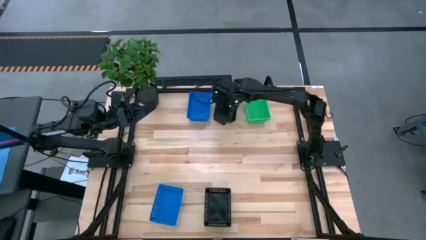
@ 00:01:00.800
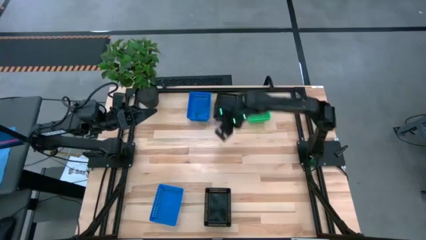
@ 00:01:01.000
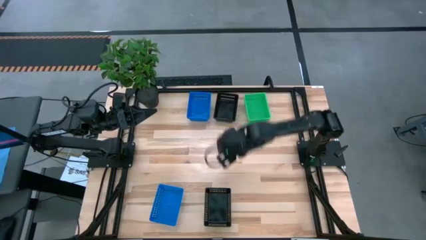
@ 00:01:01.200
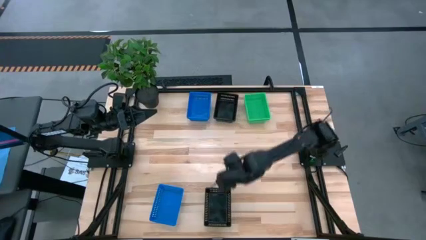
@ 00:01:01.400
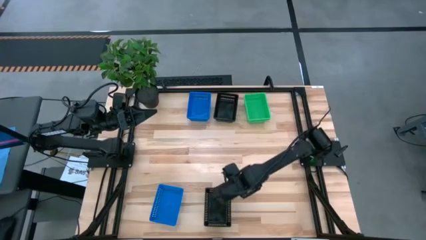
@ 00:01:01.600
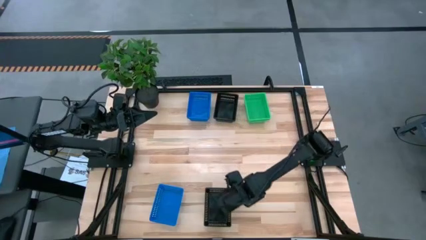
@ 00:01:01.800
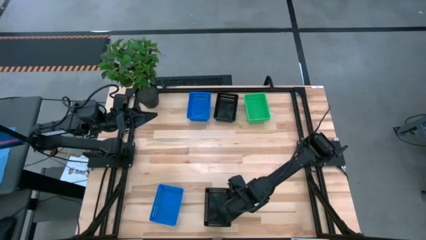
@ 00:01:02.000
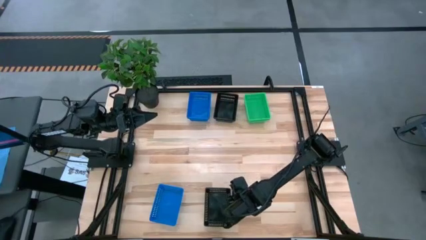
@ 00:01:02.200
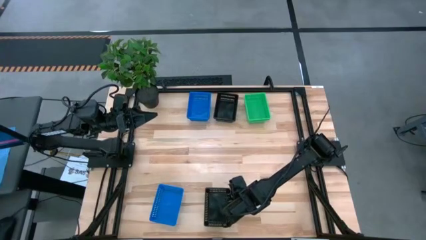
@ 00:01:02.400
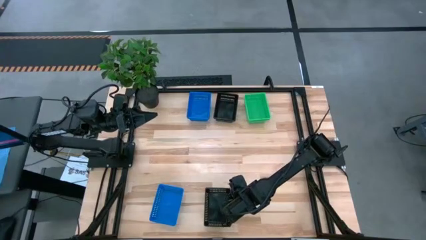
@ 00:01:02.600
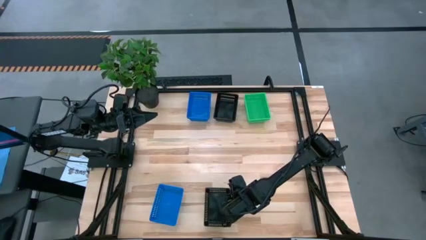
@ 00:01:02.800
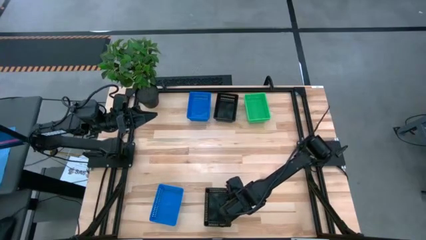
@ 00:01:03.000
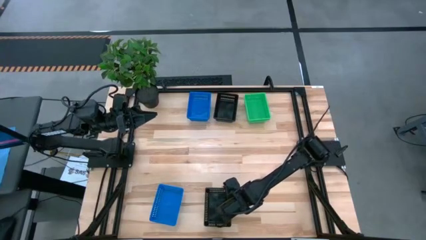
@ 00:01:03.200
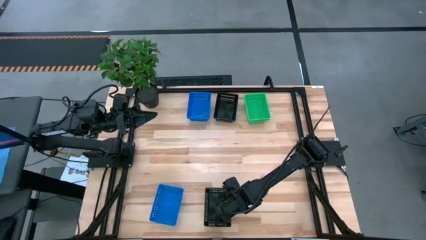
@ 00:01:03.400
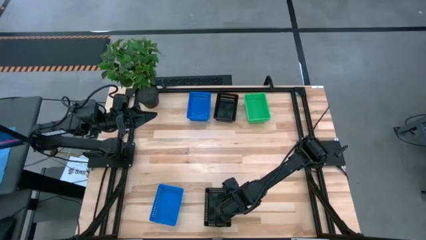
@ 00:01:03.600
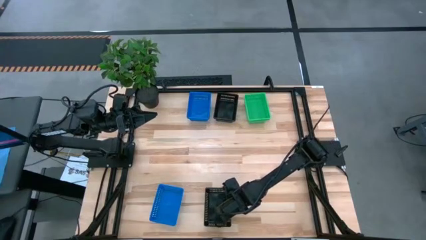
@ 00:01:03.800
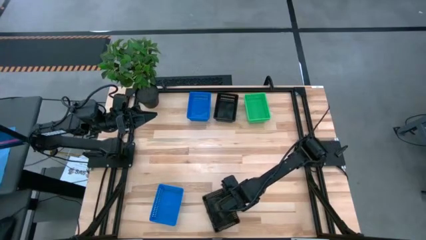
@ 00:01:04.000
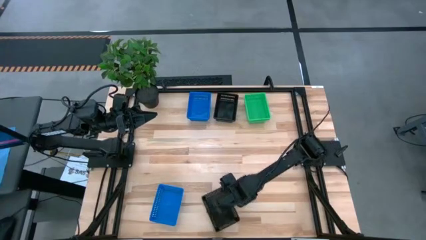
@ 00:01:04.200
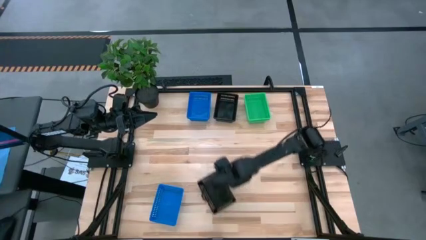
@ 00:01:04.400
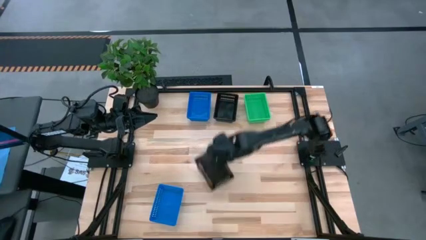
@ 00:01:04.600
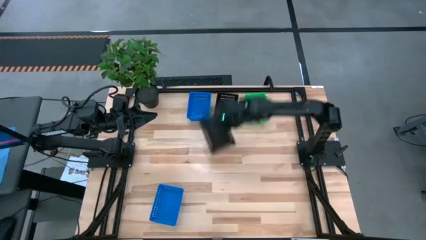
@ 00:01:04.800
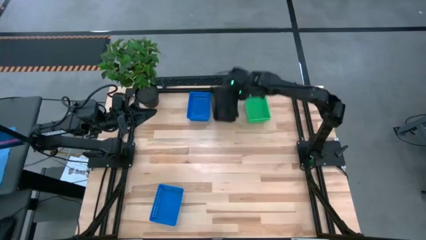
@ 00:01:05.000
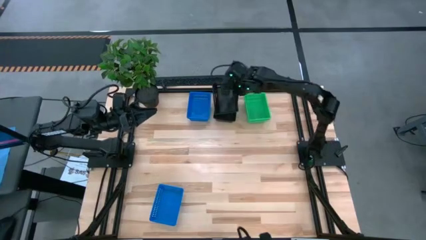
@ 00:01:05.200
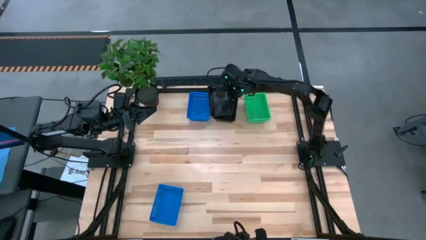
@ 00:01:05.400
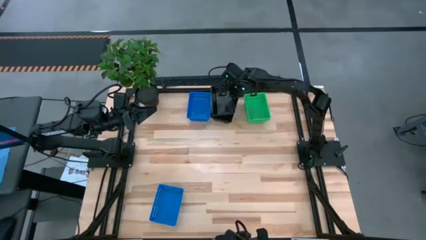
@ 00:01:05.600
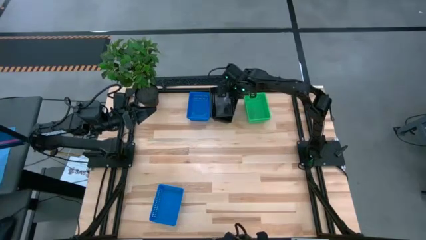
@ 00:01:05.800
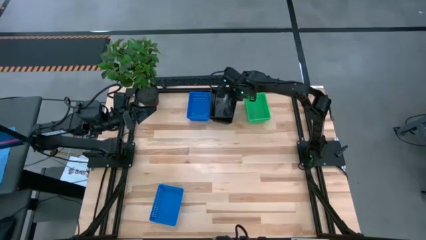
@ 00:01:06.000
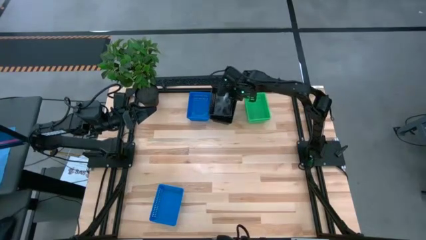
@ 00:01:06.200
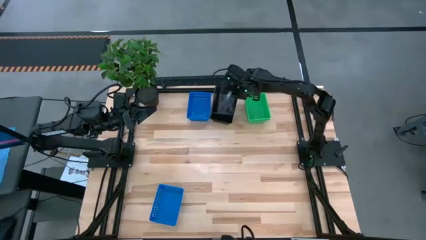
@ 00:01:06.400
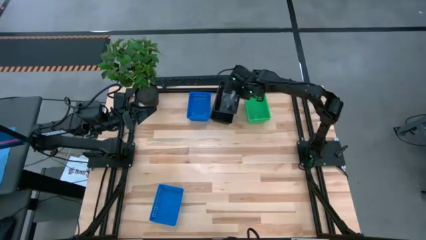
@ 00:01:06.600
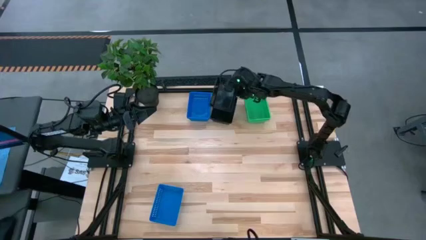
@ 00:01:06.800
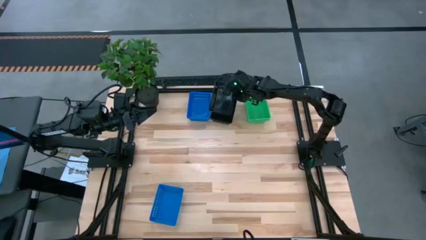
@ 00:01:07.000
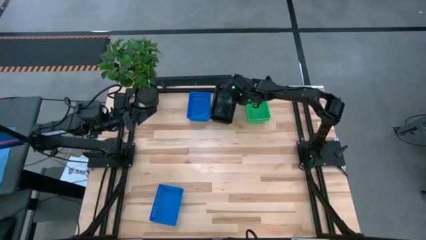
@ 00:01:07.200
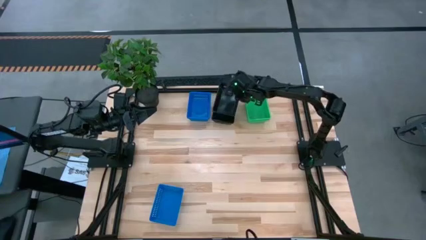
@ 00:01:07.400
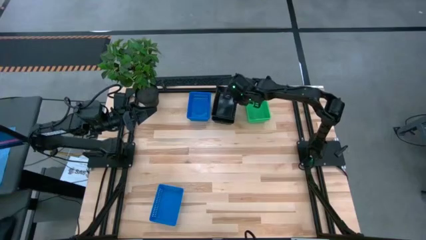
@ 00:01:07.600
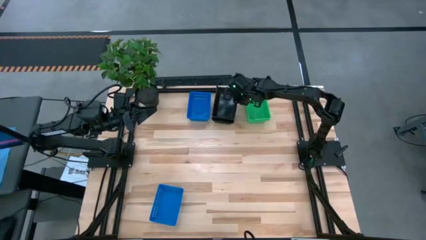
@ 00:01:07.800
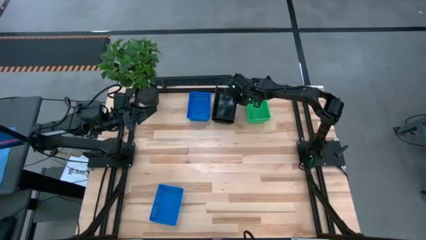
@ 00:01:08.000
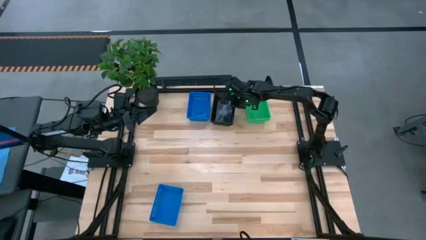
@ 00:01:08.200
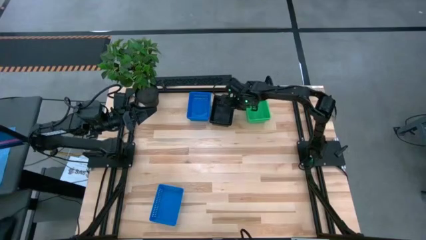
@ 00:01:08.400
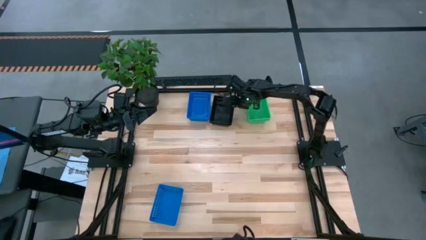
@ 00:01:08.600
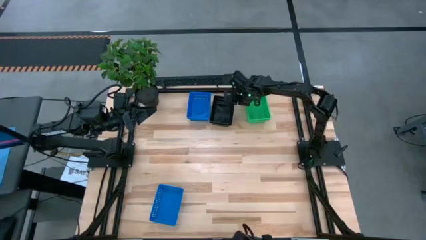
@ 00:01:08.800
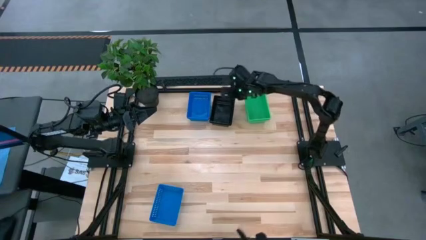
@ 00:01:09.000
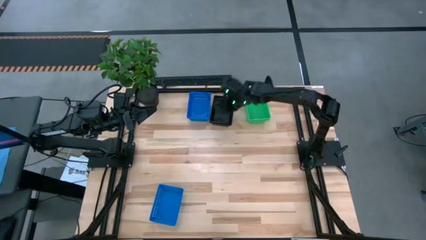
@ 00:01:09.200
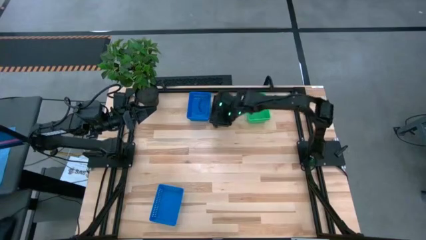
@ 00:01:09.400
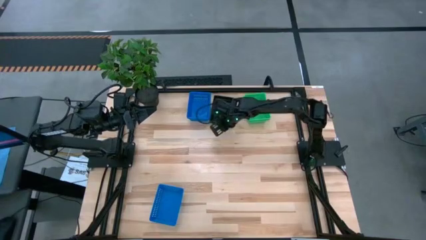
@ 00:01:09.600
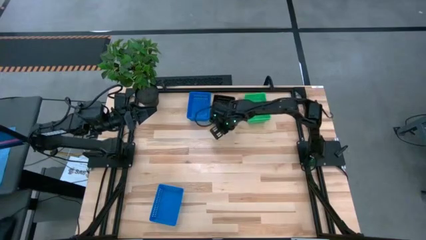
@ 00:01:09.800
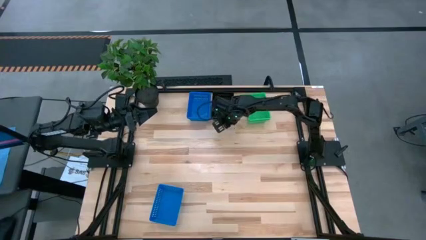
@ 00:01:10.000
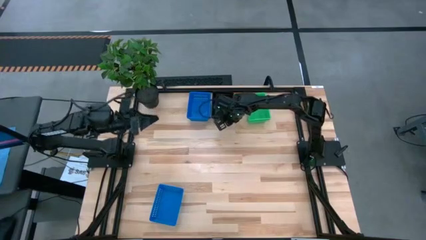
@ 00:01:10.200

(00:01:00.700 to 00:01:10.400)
Stack the bottom black bin on the stacked black bins

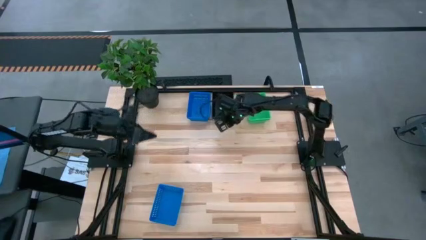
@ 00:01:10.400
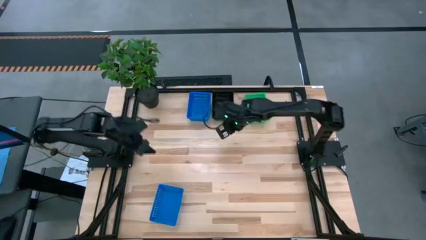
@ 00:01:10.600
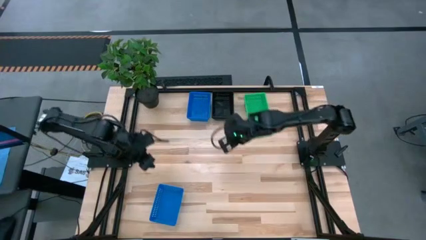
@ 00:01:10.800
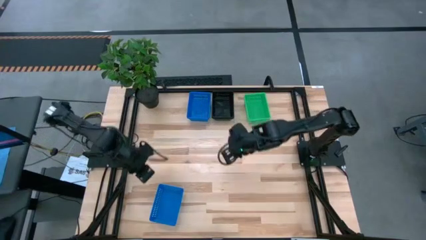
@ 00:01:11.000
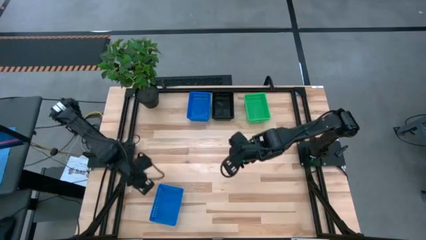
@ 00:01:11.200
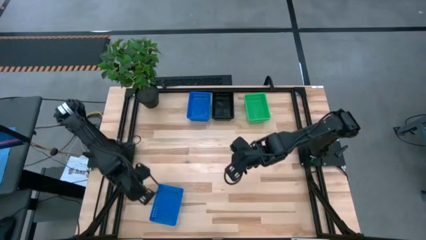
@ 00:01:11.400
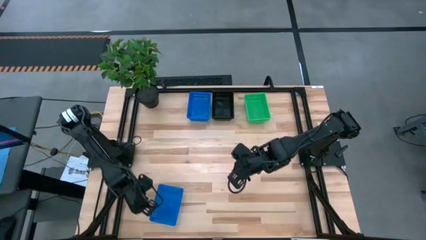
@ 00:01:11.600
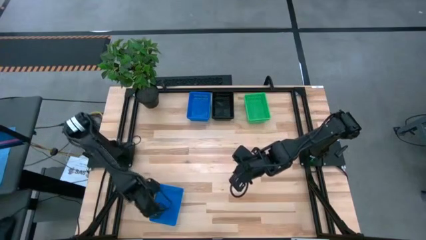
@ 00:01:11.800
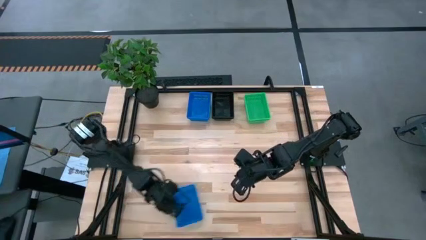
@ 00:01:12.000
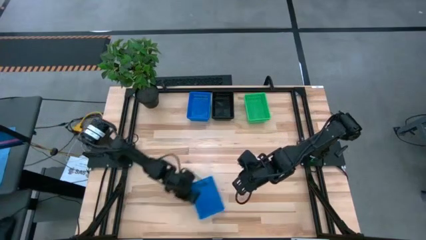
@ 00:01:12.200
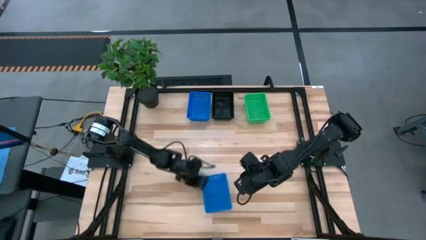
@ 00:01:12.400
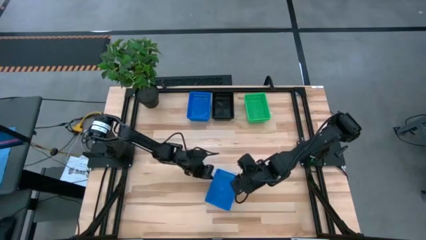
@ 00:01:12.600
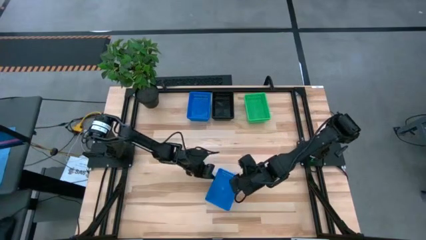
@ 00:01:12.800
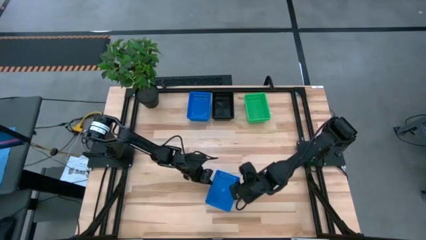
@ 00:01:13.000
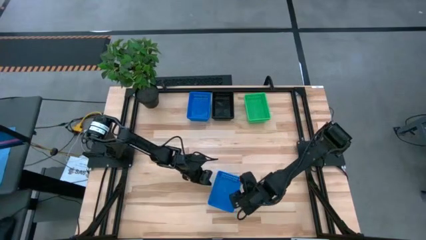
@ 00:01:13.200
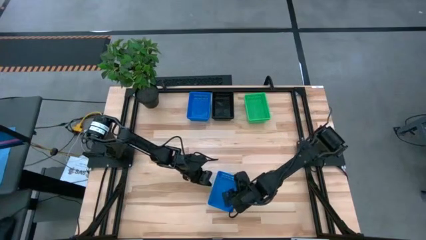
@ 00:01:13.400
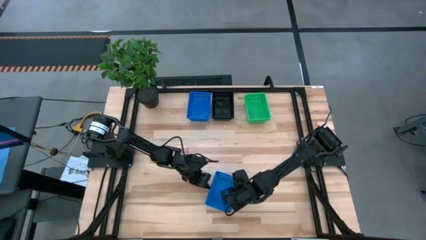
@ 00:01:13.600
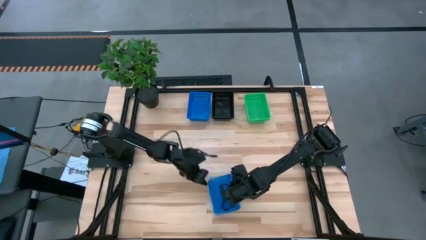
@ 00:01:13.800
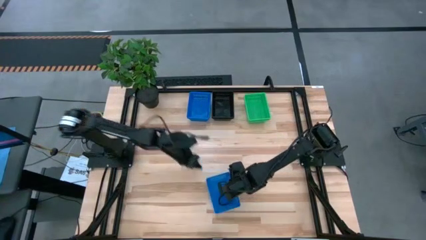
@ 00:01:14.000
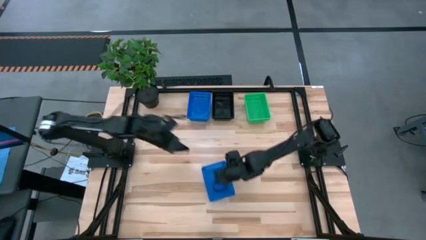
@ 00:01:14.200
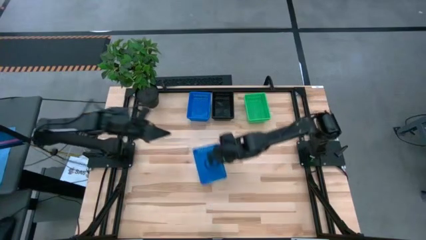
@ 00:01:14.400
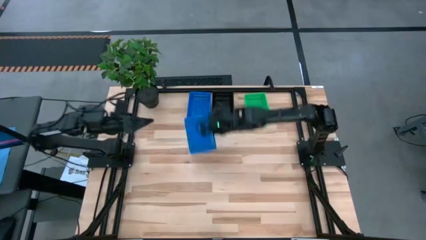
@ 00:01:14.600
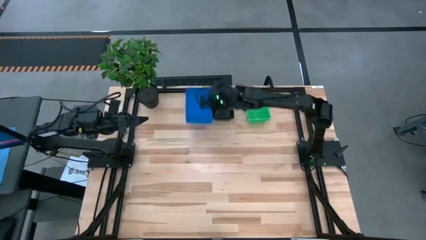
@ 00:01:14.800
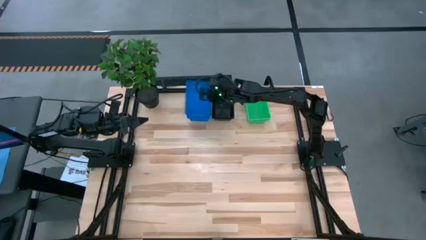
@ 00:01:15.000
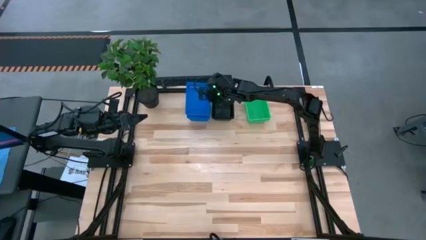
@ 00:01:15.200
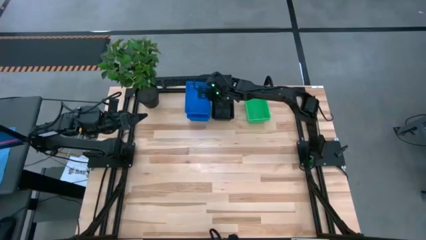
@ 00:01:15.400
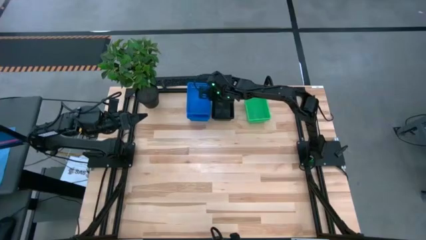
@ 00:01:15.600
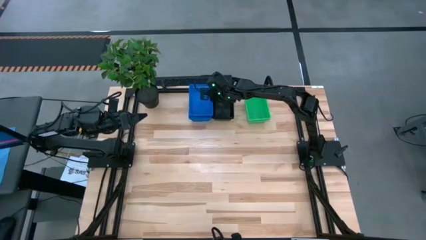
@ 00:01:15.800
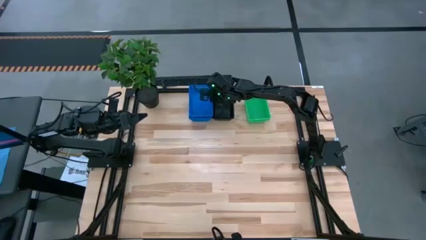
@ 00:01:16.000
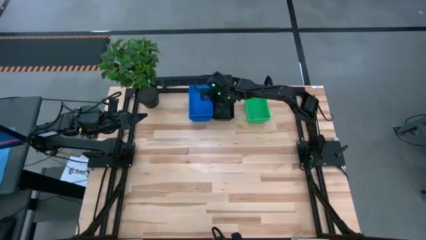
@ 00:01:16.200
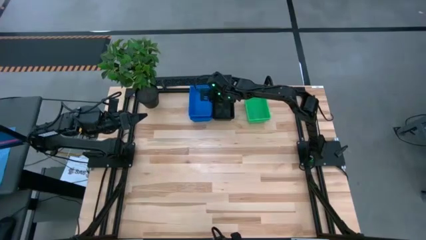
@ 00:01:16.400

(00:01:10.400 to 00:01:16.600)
Stack the bottom blue bin on the stacked blue bins
